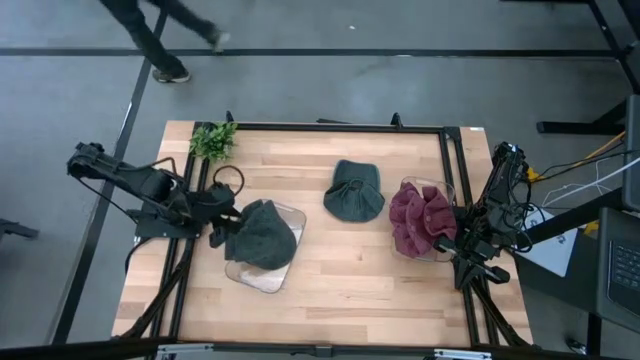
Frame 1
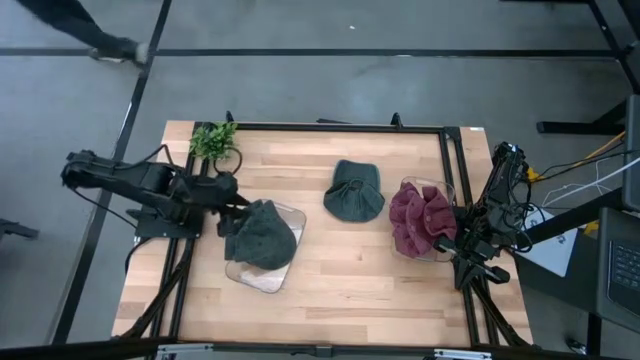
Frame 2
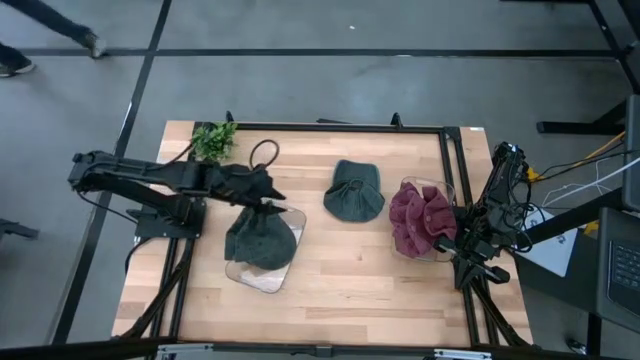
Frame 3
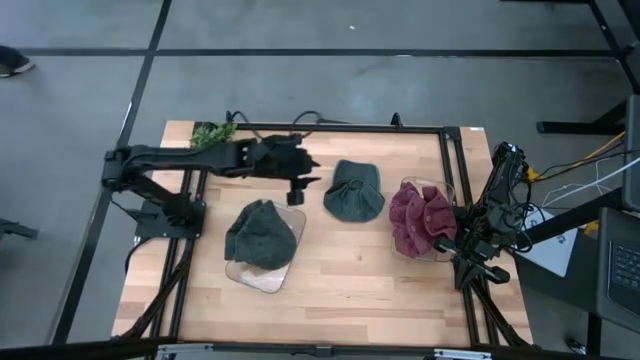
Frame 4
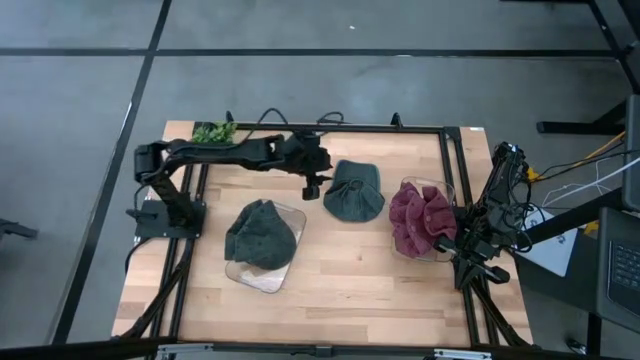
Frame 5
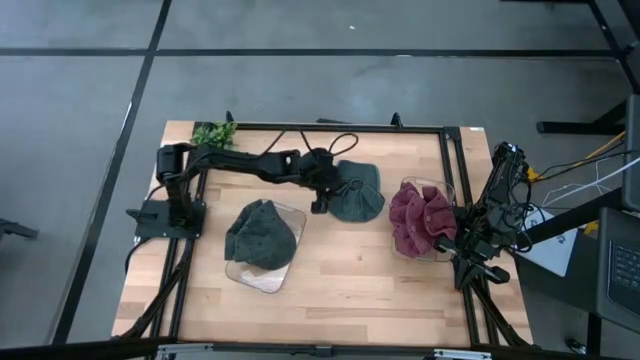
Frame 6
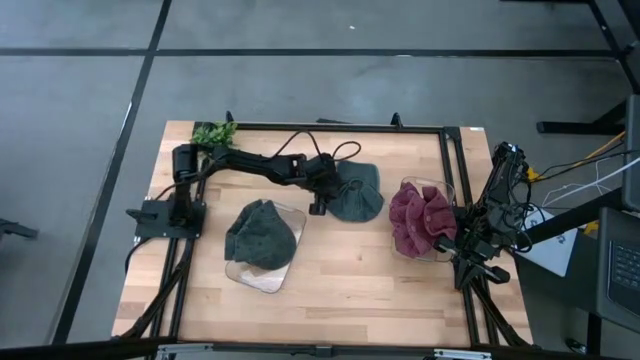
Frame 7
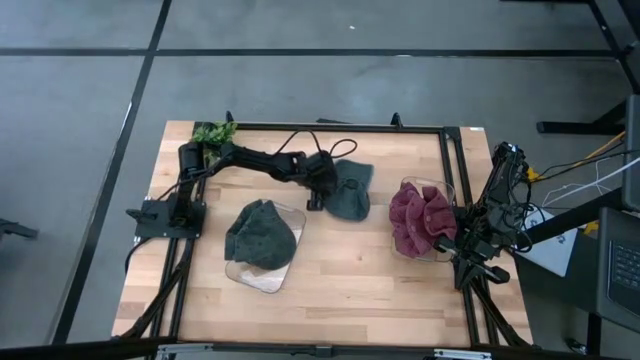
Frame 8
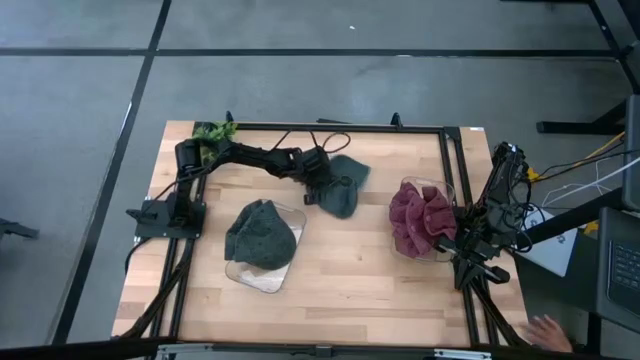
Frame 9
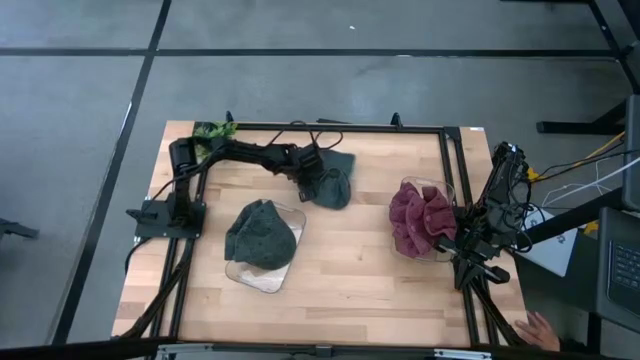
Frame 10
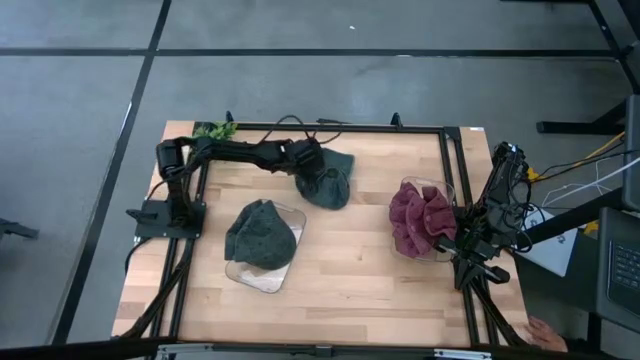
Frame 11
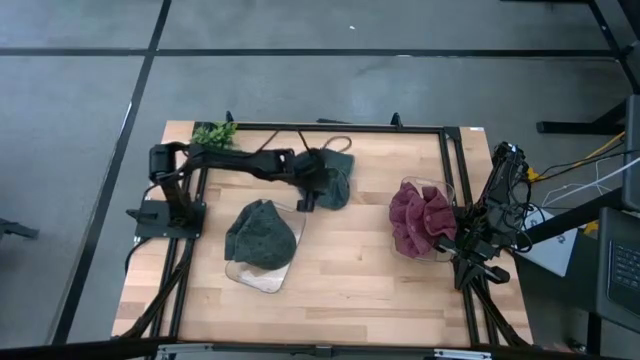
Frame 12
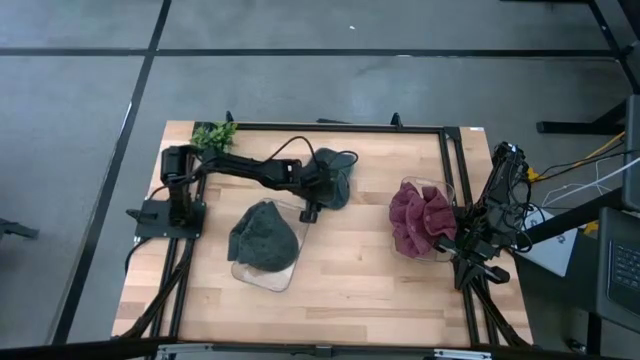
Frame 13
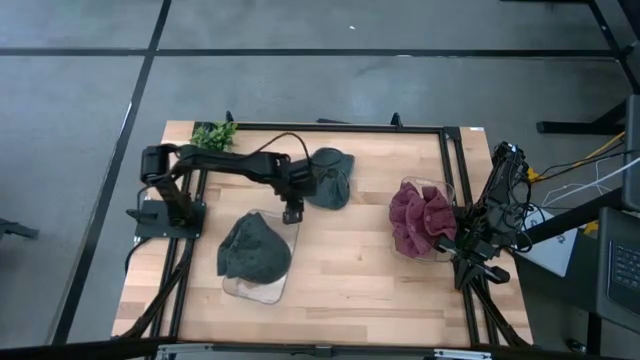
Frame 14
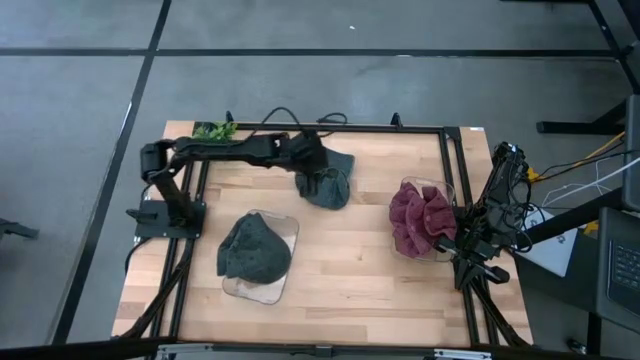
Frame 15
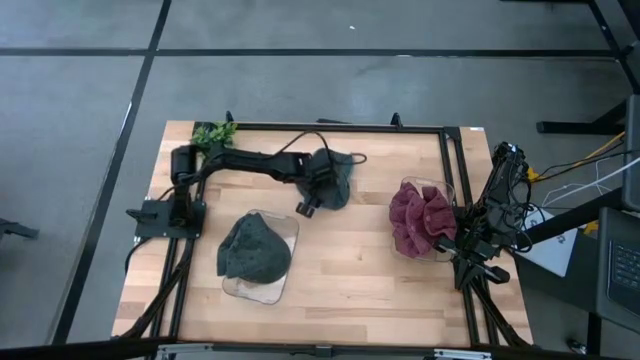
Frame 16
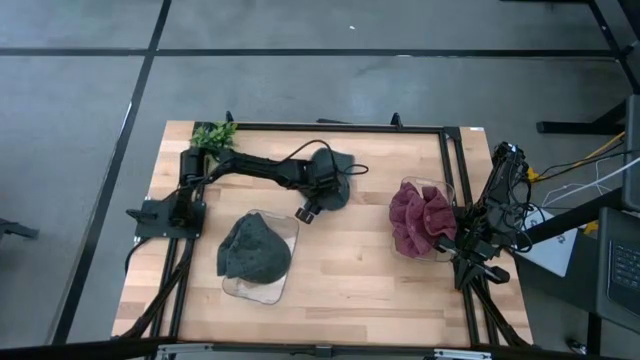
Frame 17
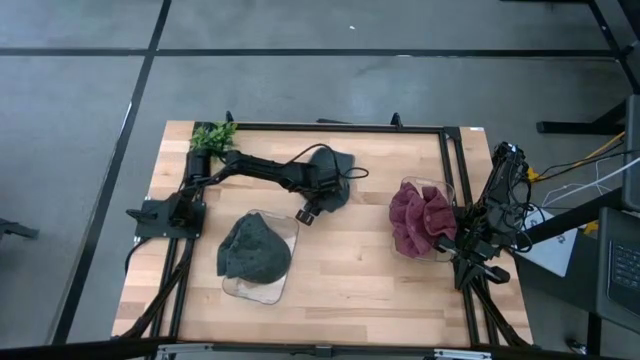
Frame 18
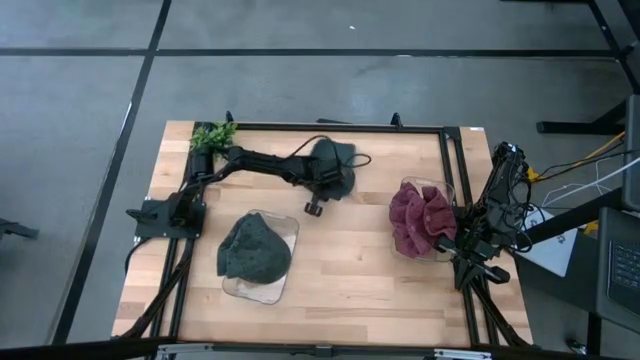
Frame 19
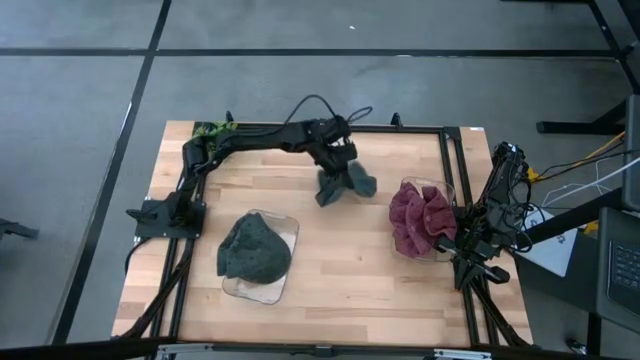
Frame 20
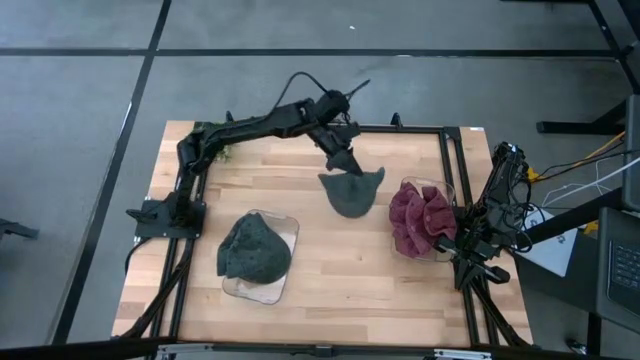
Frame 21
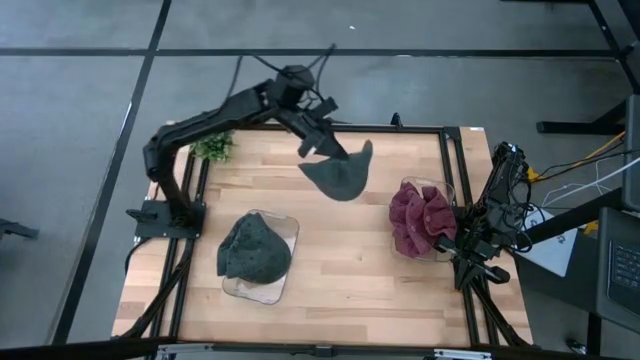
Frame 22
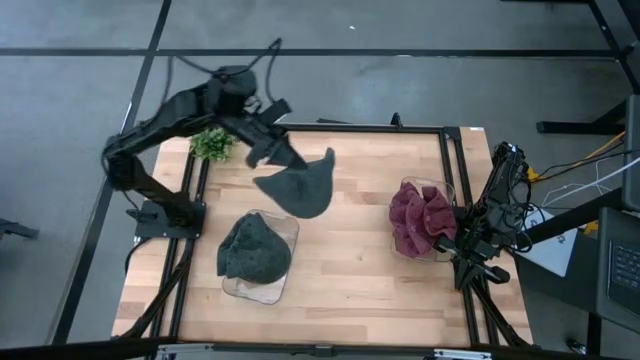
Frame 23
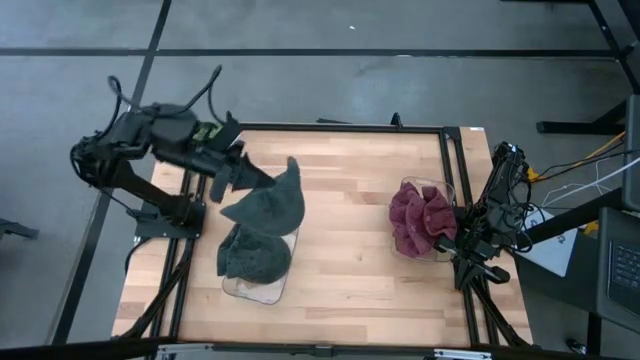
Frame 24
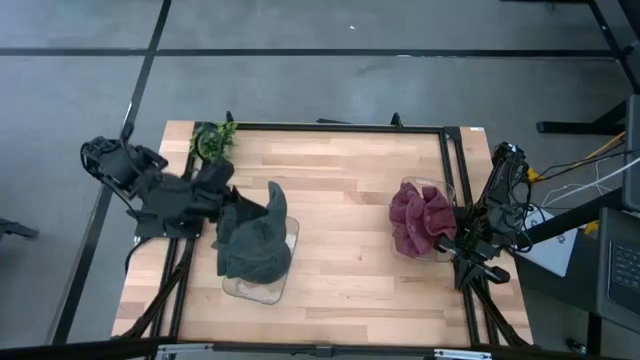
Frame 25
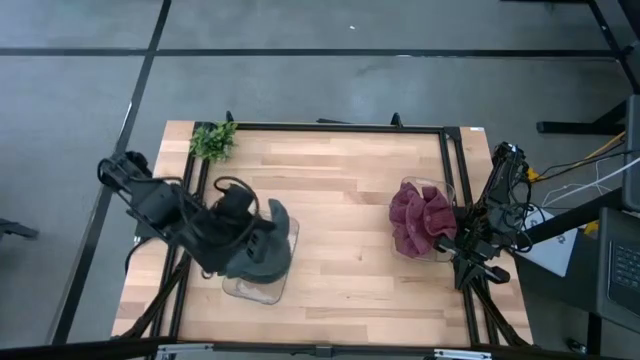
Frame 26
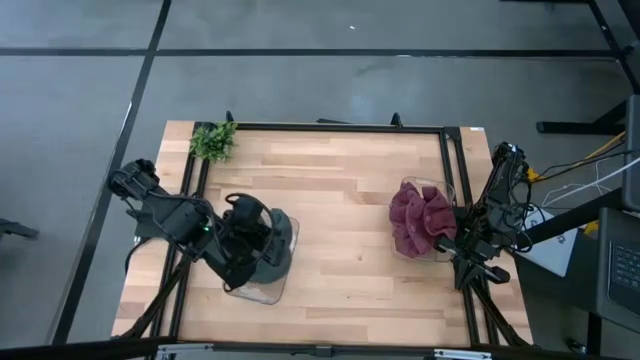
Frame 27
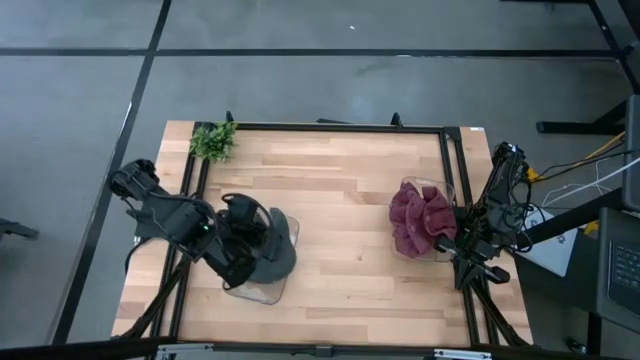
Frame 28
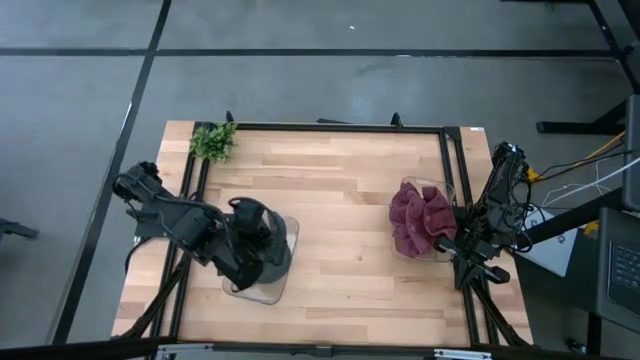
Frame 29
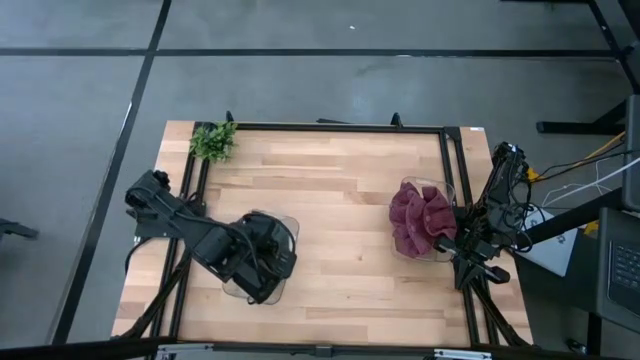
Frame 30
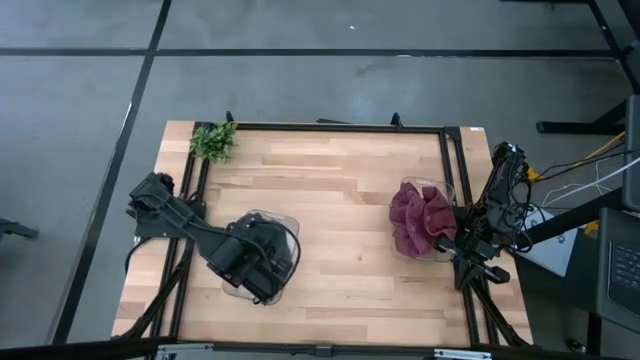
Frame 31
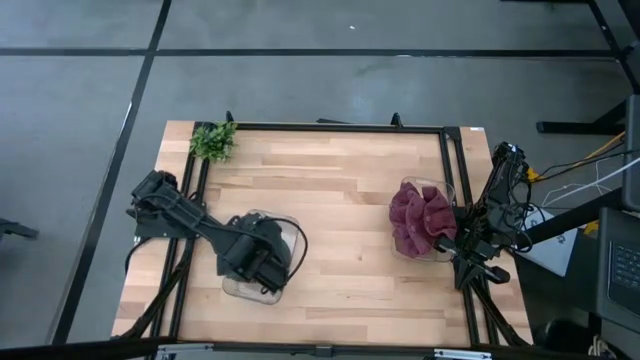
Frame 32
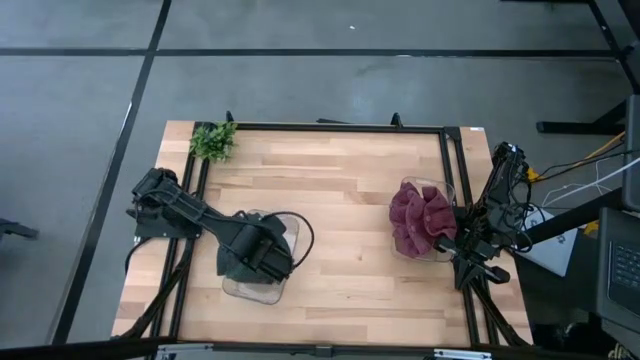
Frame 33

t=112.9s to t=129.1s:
Task: Pick & Place hat
Put the black cap into the left transparent bin

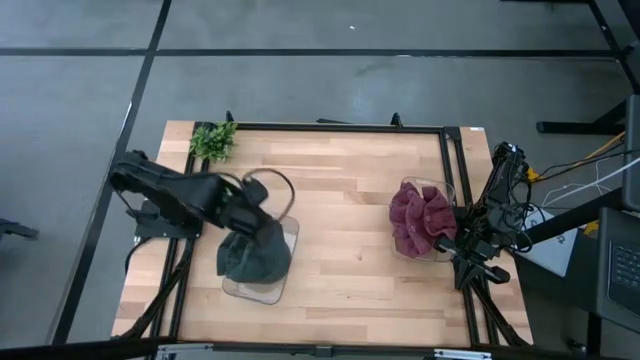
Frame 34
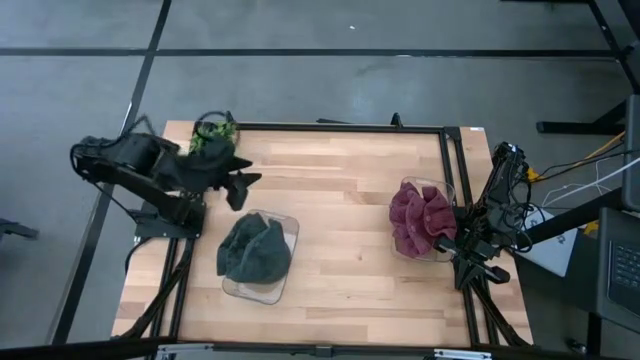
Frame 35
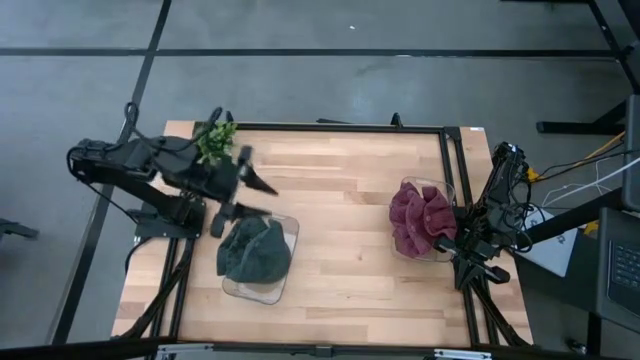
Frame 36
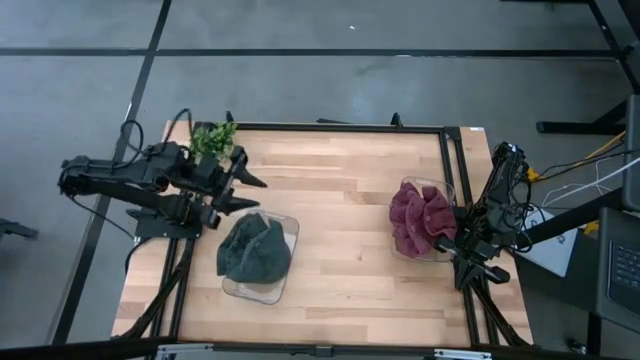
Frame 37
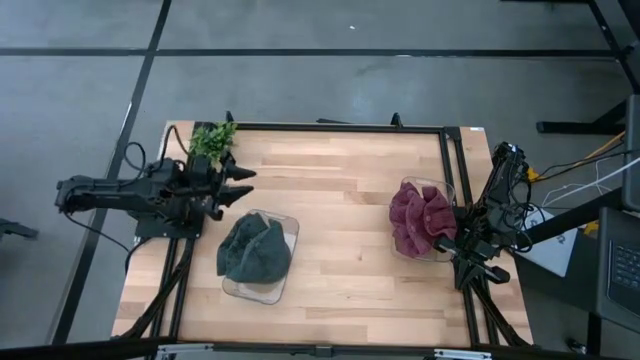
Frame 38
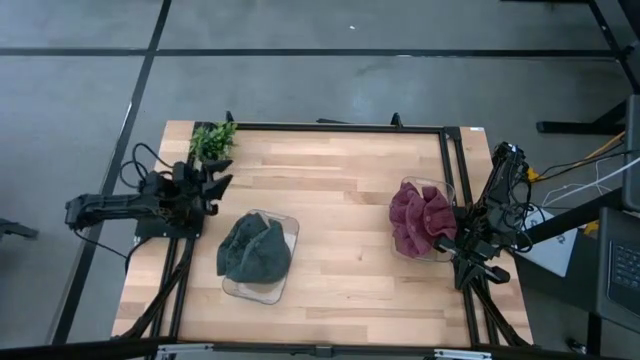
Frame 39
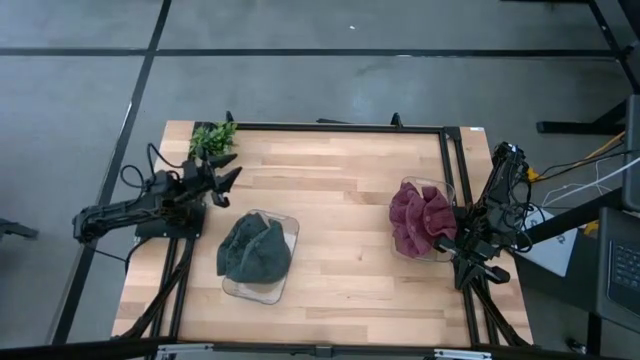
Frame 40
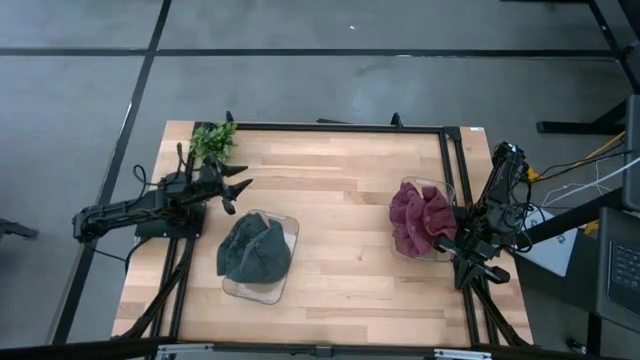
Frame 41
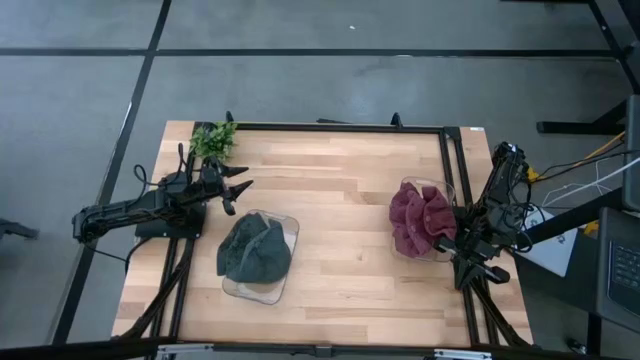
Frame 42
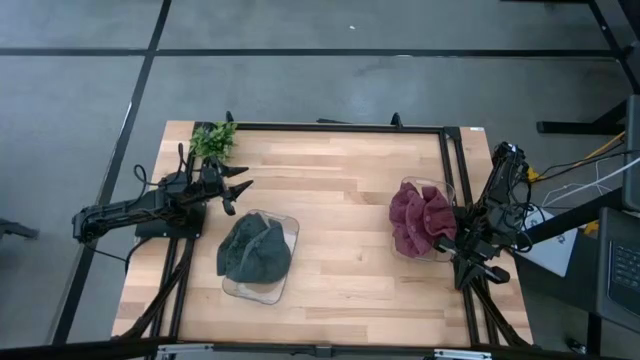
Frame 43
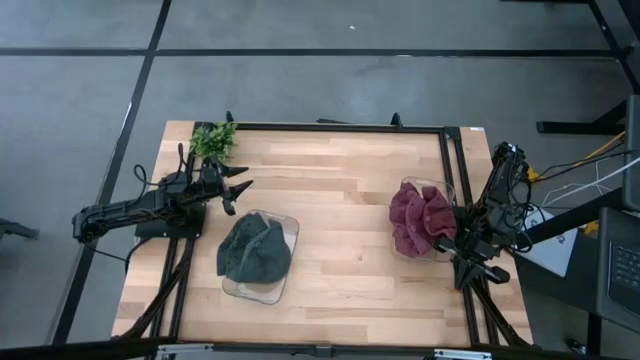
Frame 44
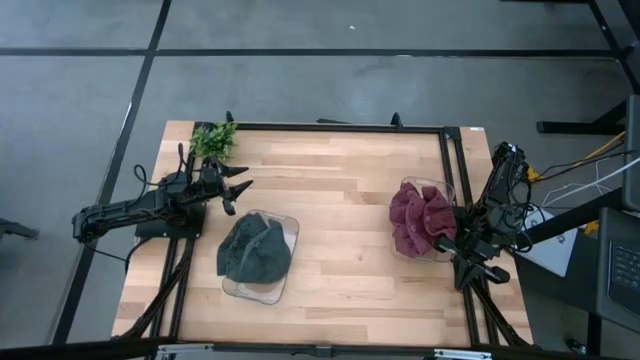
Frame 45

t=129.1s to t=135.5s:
Return to Home Position
